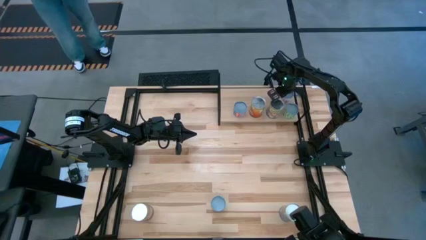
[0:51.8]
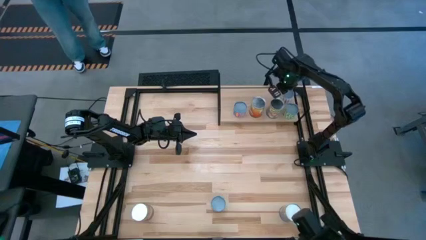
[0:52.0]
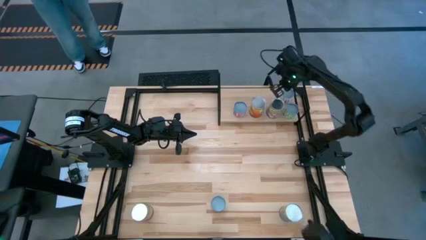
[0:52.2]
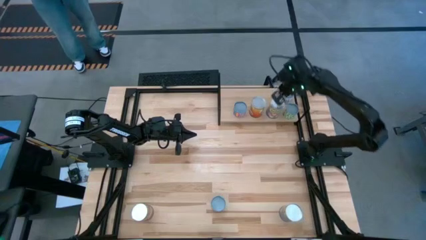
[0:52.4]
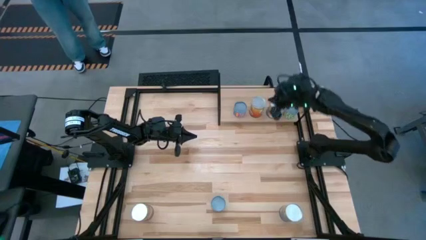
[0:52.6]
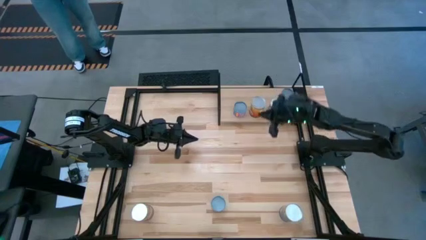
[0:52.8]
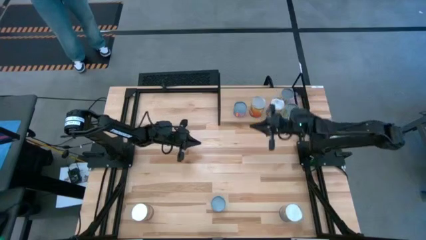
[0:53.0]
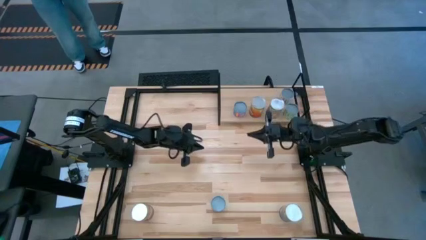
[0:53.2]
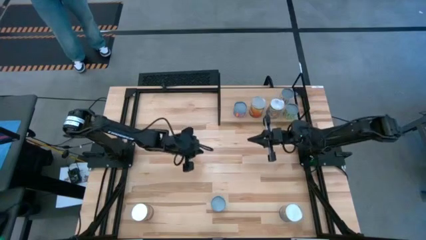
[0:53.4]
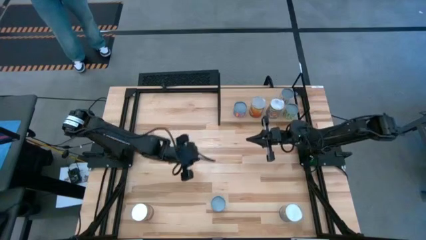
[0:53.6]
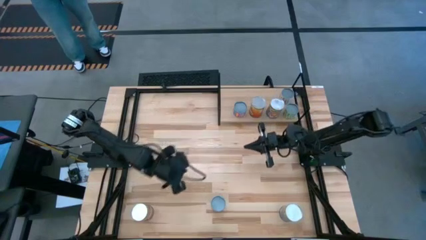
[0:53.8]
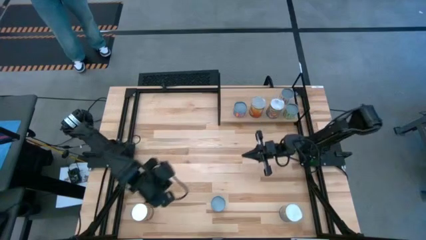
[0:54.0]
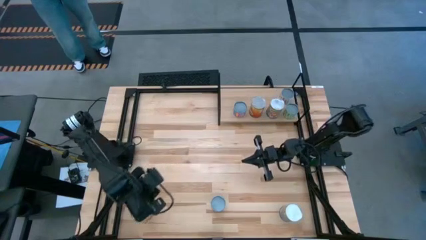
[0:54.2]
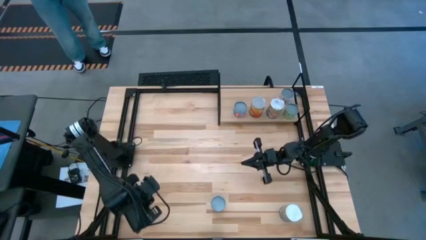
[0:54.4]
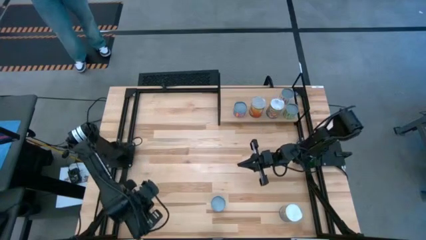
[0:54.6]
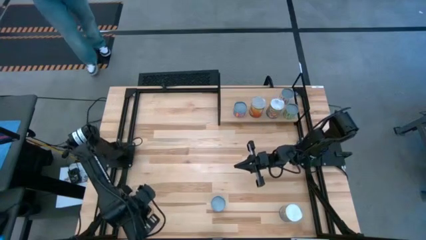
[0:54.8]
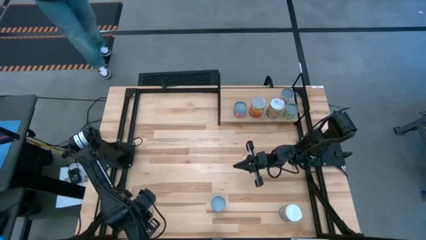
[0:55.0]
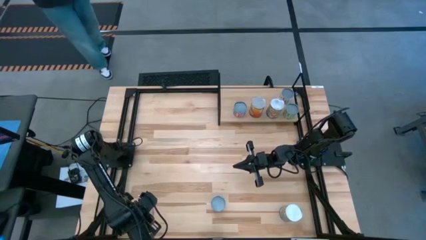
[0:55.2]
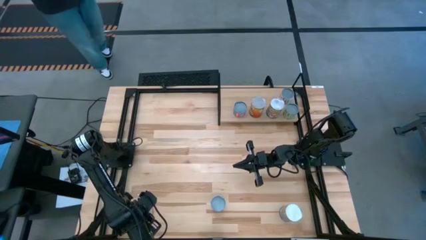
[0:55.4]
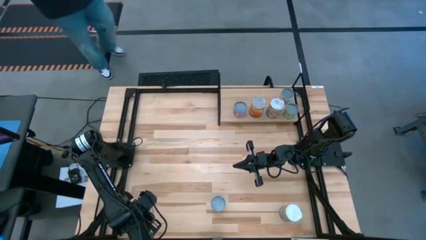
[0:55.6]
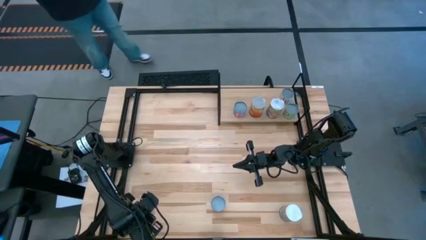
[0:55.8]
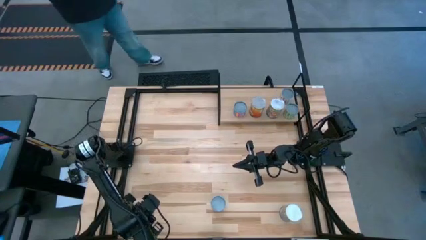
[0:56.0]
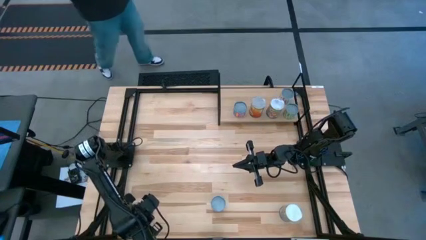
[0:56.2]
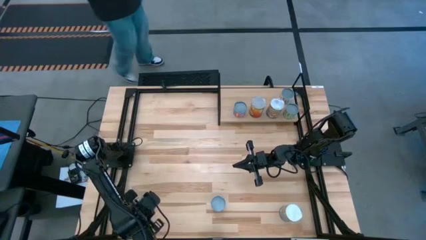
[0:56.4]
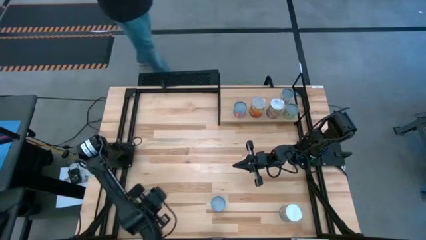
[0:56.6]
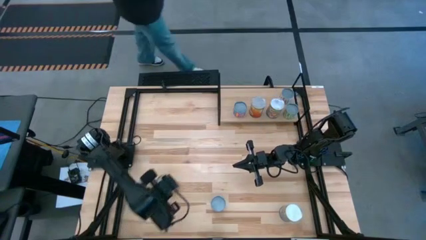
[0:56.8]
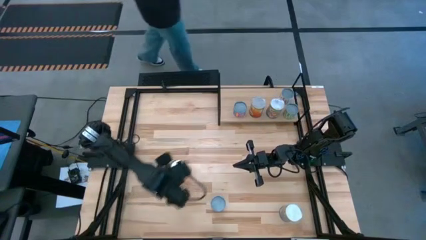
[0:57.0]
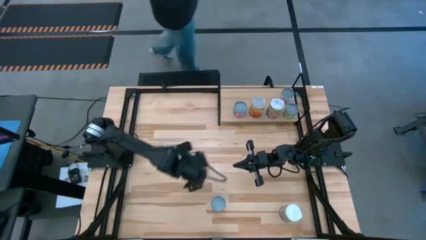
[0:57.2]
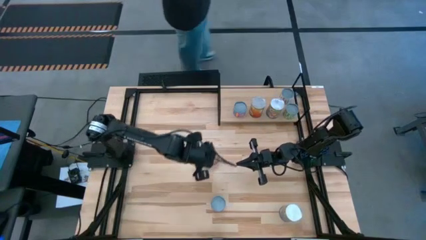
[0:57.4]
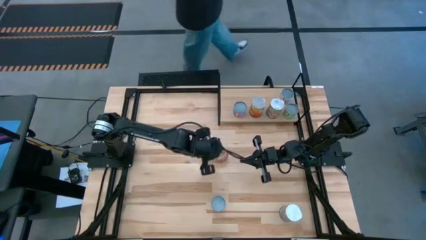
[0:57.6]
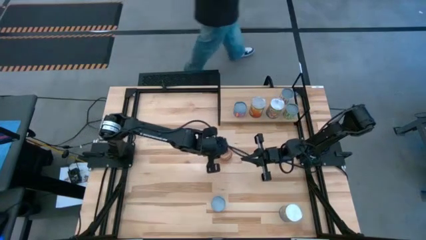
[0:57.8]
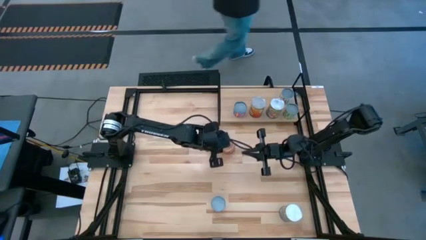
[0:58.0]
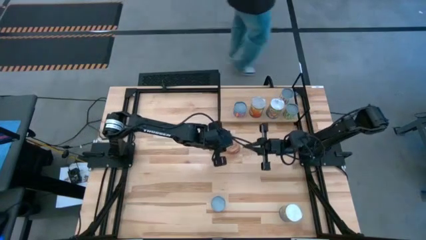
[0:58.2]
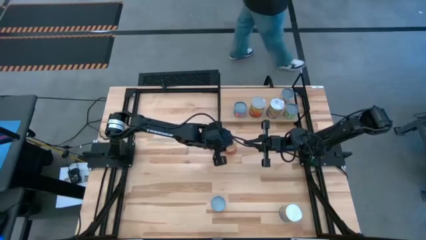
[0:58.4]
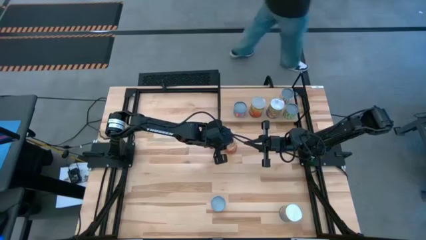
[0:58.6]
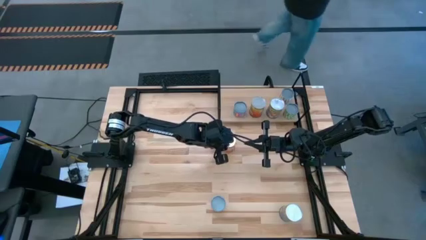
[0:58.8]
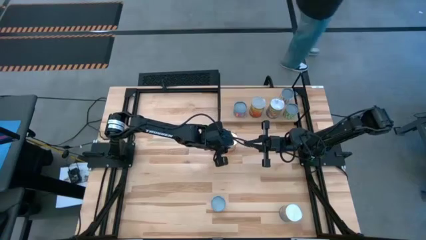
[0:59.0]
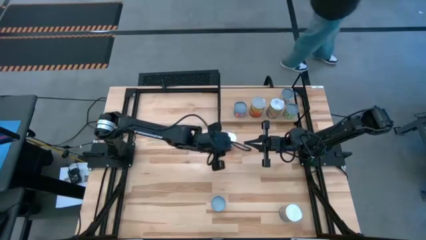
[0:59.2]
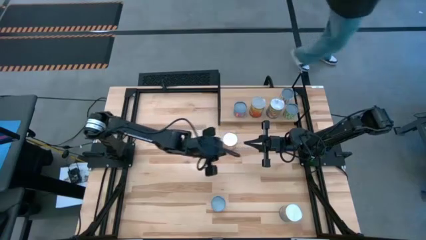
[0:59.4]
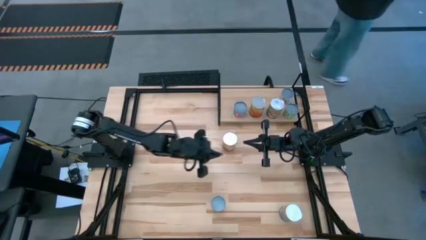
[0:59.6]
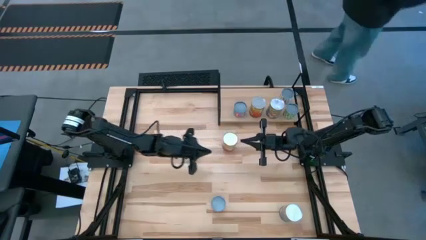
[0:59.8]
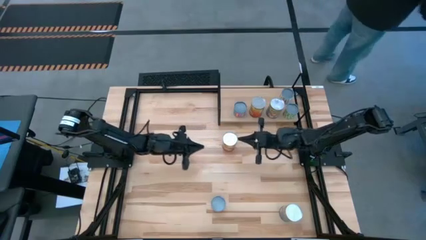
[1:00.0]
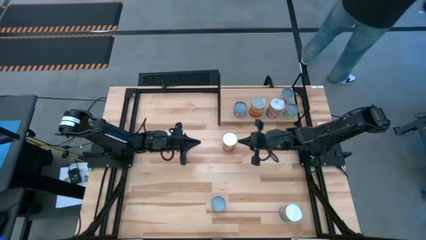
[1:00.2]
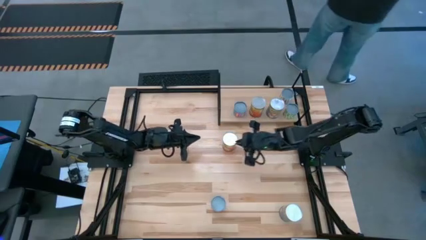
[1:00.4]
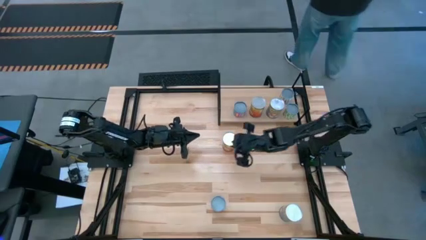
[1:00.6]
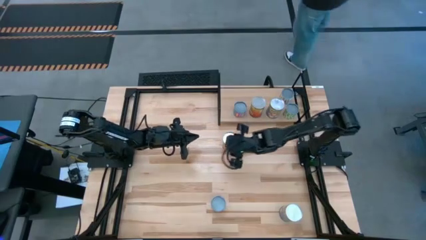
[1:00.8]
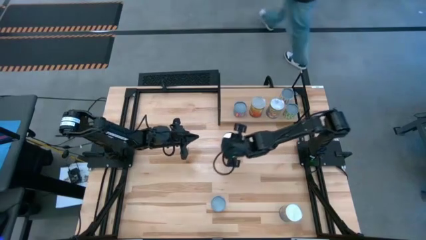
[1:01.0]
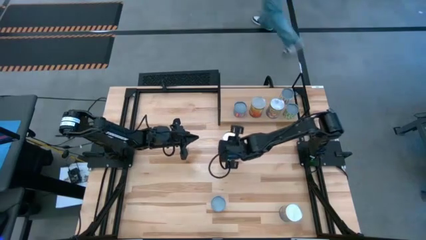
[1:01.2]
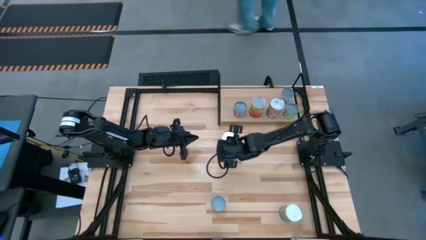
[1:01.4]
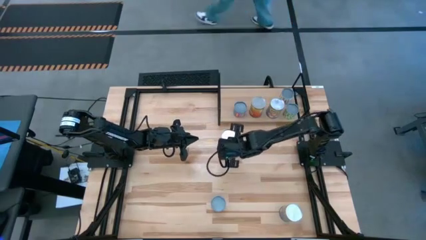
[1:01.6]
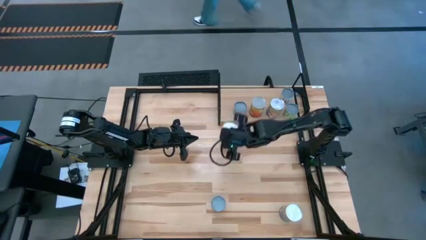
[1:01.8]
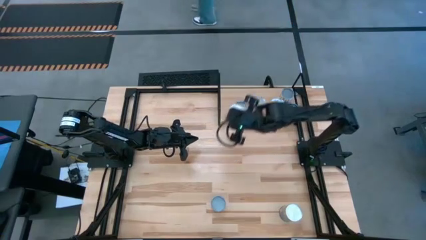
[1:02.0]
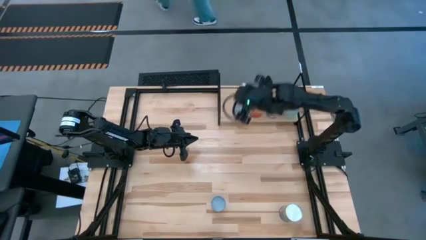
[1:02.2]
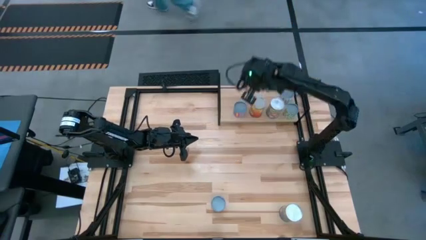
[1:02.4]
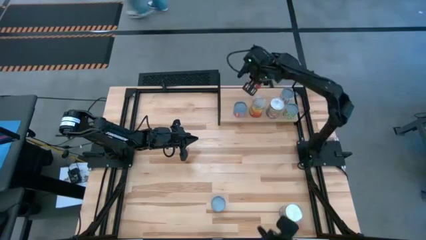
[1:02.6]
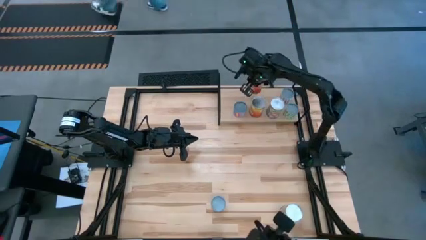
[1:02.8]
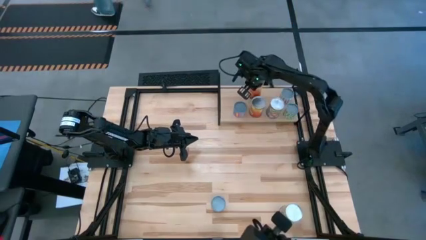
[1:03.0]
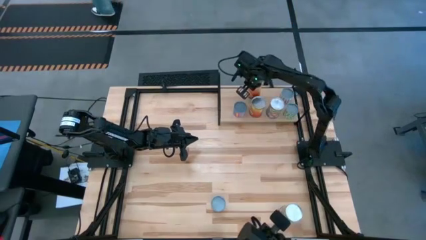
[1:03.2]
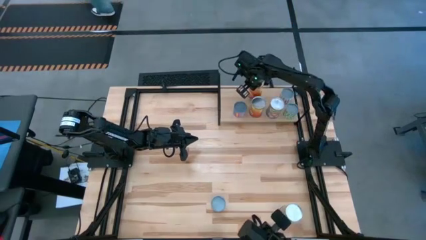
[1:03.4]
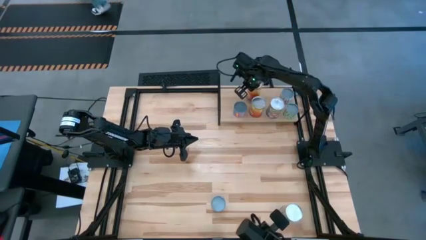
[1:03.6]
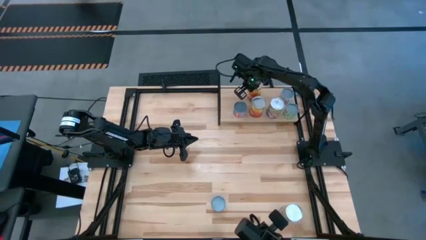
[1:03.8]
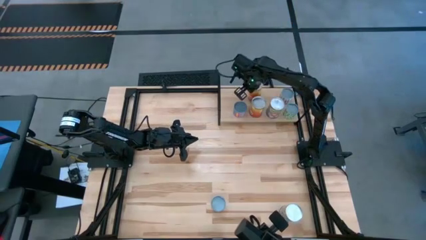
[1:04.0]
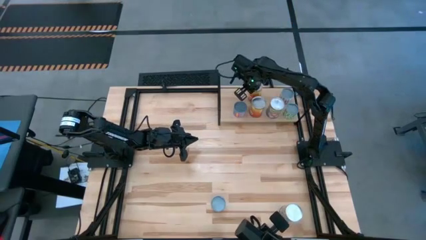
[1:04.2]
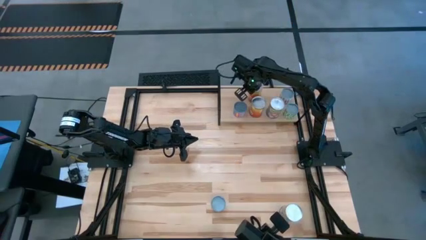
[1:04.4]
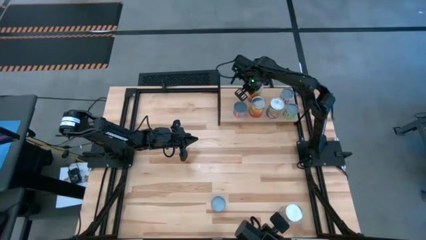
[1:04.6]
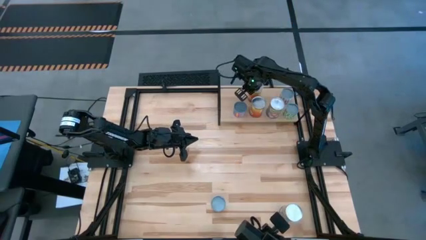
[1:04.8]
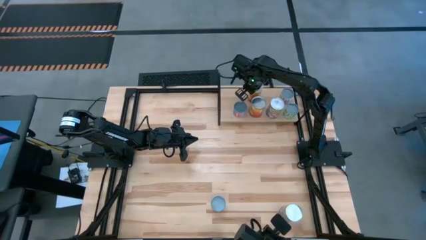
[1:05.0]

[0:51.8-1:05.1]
Task: Pick and place cans onto a shelf
Put the large canned corn on the shelf aligned with the other large canned corn

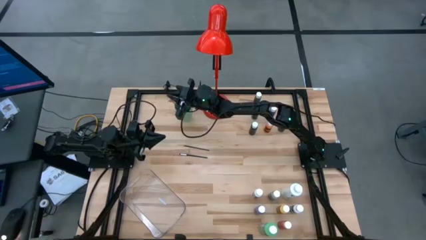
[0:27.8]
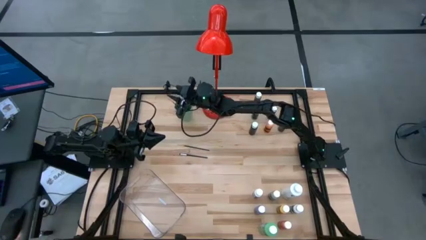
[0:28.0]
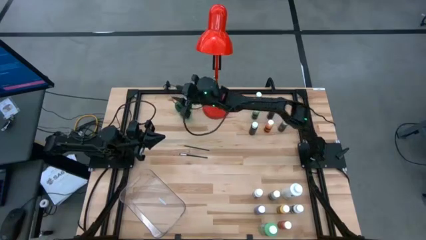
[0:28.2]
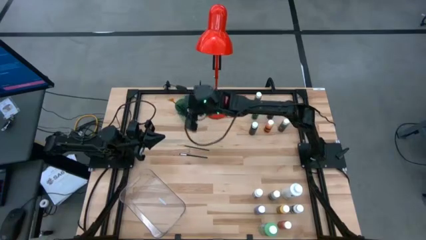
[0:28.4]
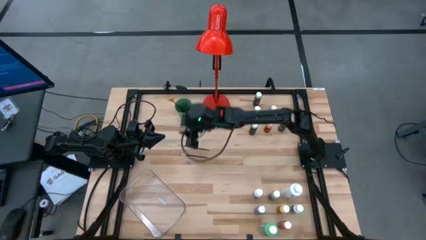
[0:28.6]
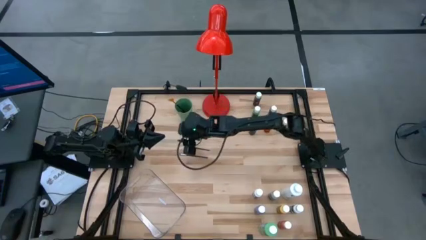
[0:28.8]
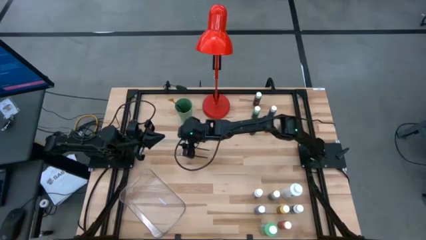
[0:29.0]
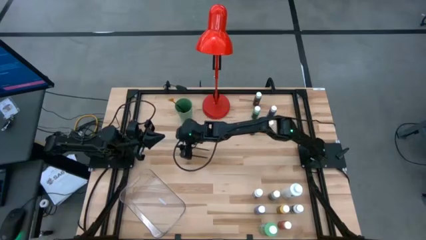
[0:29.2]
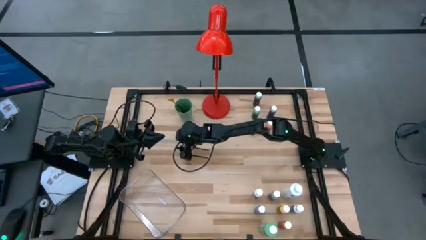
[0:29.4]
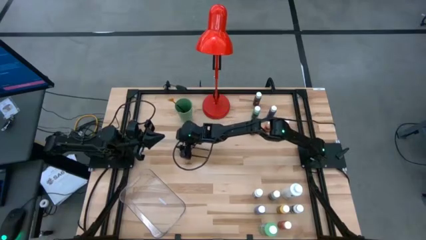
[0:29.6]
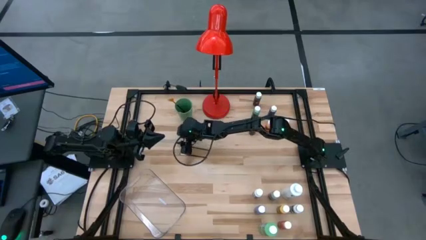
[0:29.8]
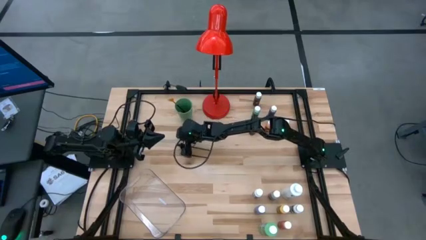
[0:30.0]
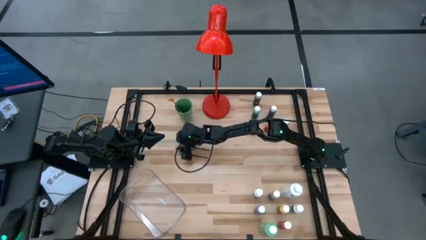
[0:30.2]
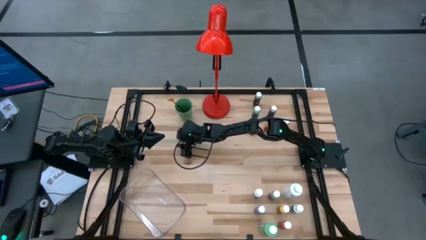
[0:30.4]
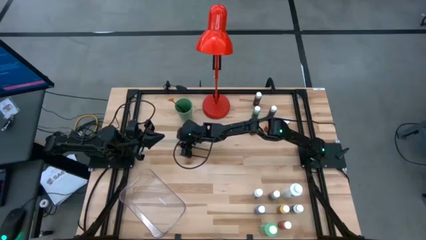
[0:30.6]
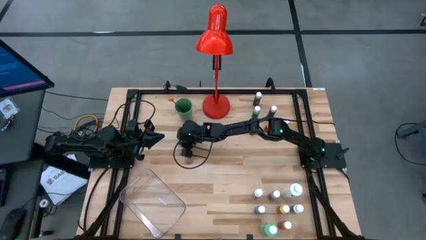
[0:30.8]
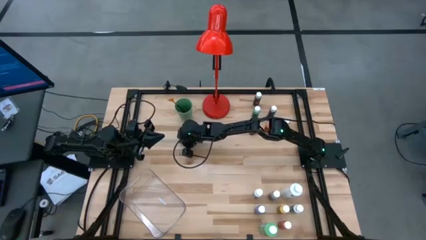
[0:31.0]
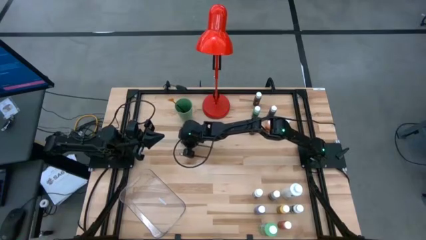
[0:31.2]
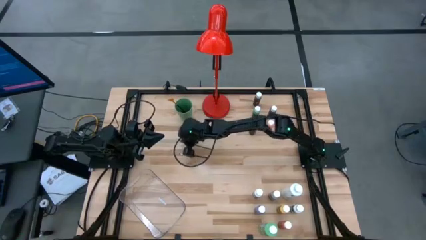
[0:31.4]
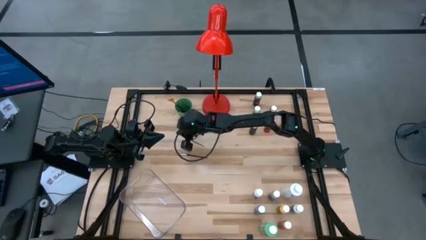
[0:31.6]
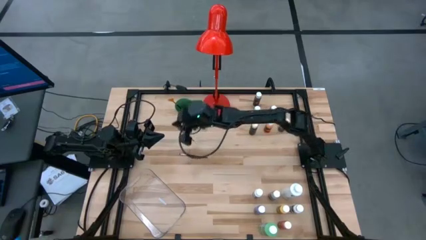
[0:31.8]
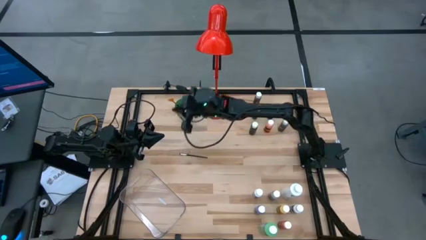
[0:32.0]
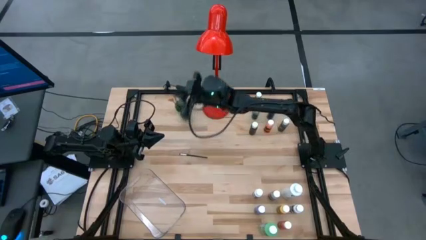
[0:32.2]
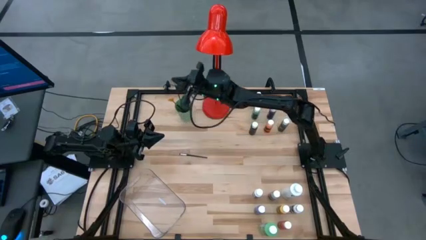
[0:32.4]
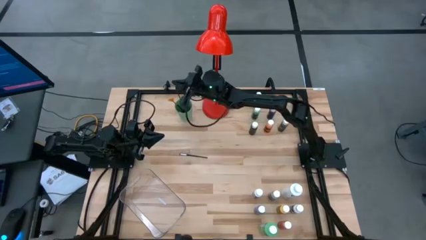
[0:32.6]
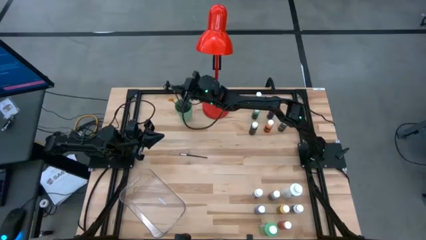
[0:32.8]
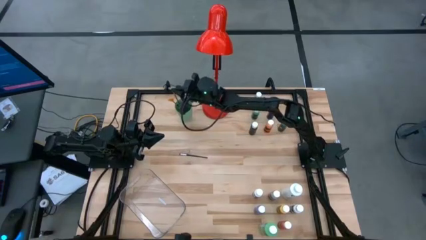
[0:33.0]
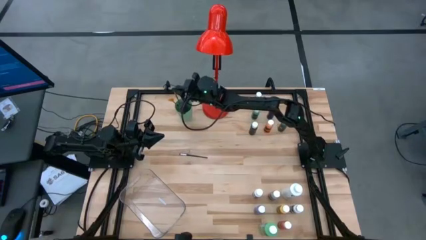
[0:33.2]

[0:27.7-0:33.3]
Task: Pick & Place Paint Supplies
Put the orange paint brush into the green cup
